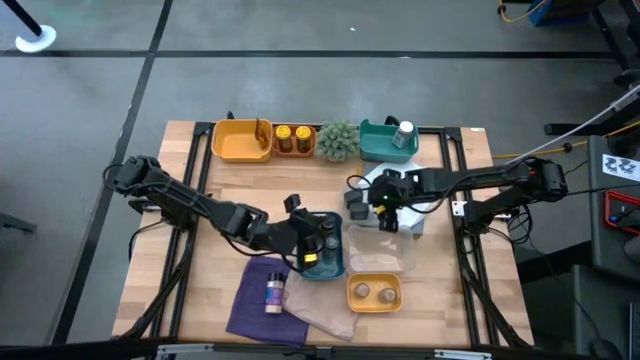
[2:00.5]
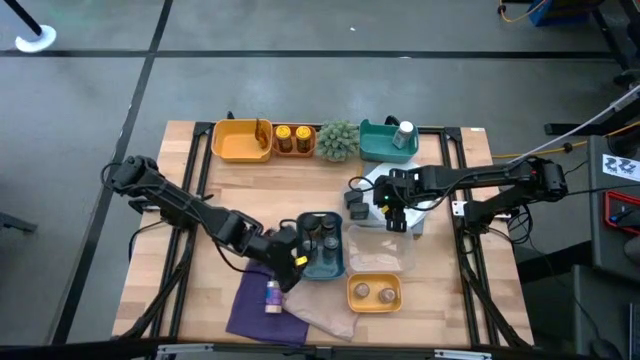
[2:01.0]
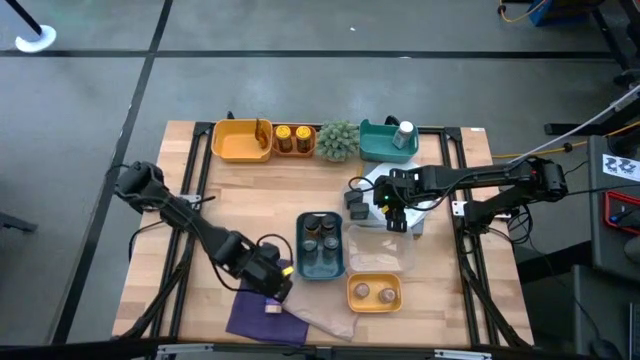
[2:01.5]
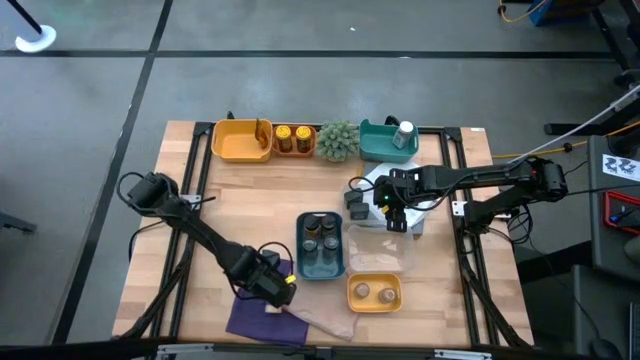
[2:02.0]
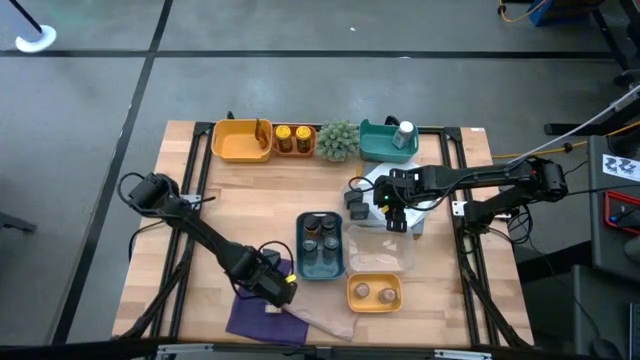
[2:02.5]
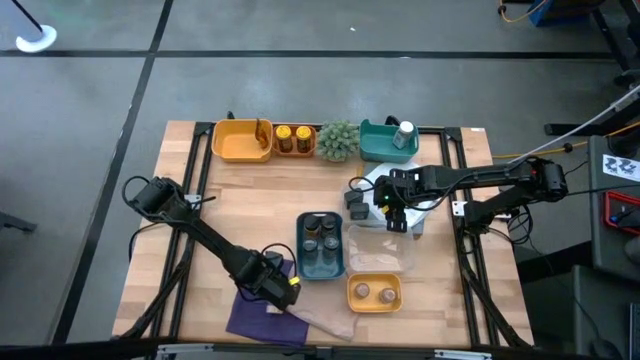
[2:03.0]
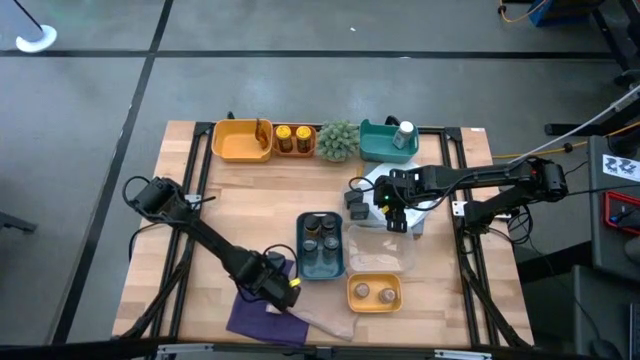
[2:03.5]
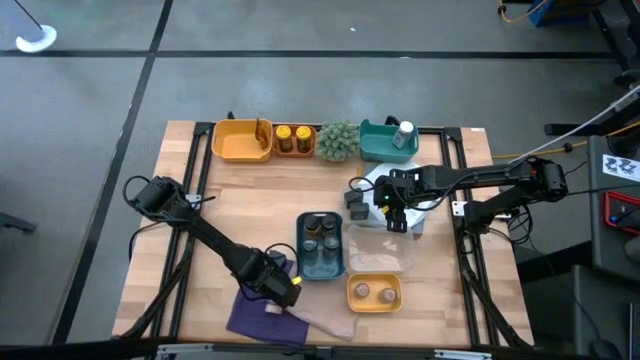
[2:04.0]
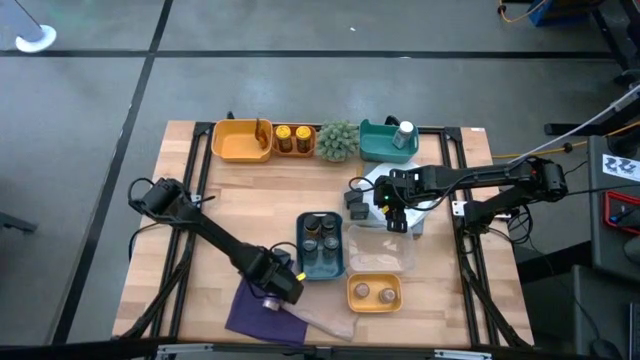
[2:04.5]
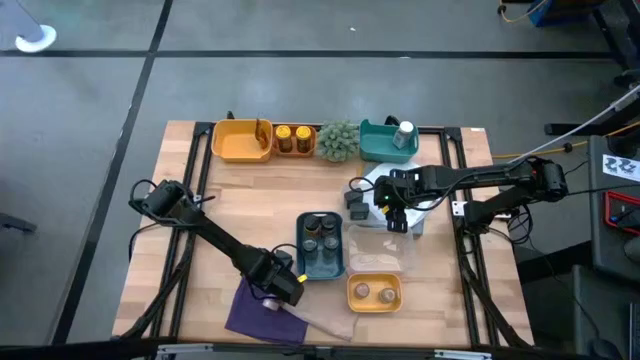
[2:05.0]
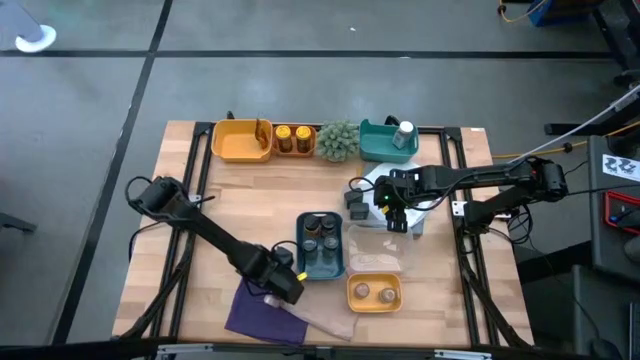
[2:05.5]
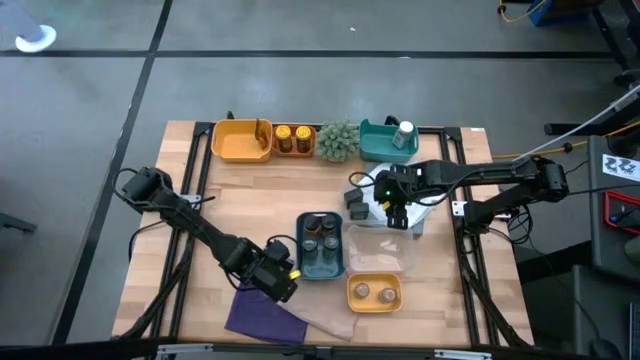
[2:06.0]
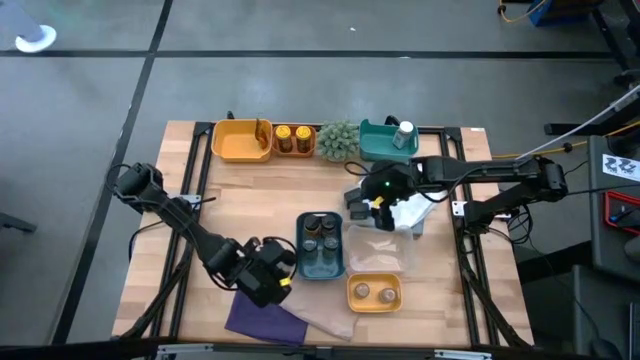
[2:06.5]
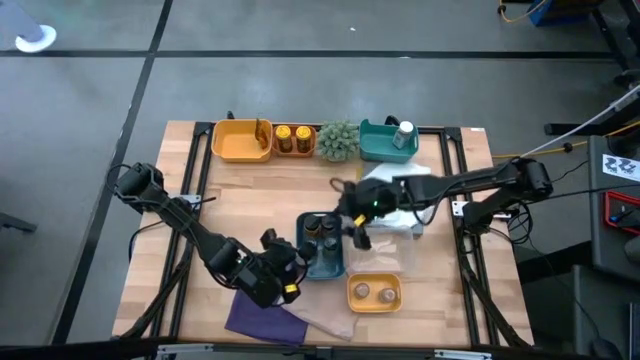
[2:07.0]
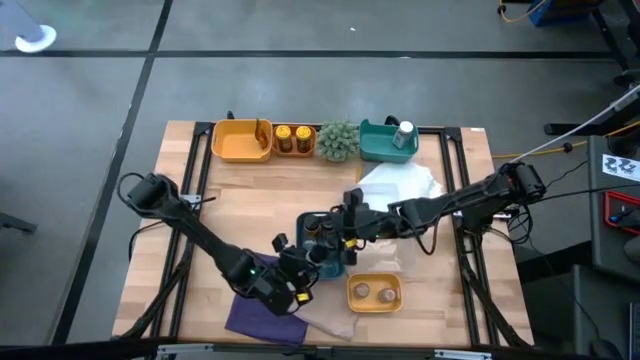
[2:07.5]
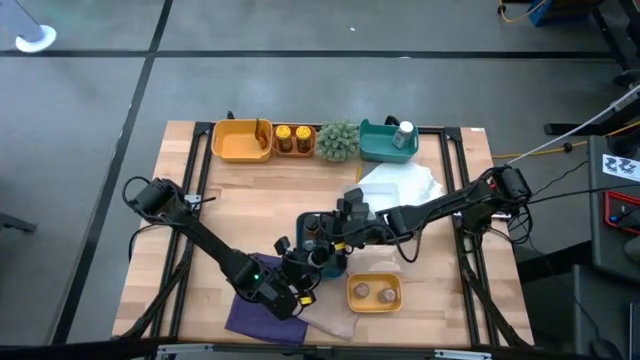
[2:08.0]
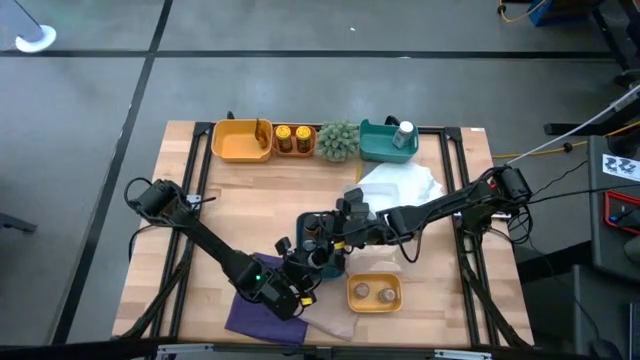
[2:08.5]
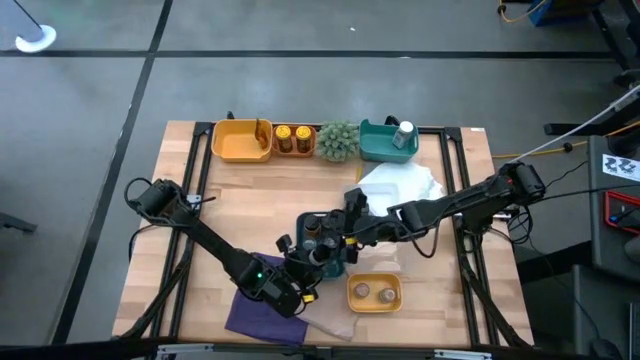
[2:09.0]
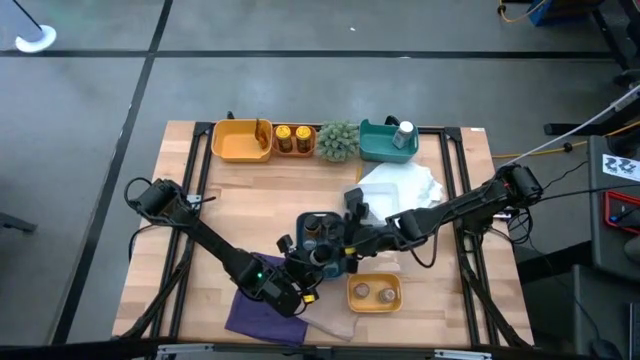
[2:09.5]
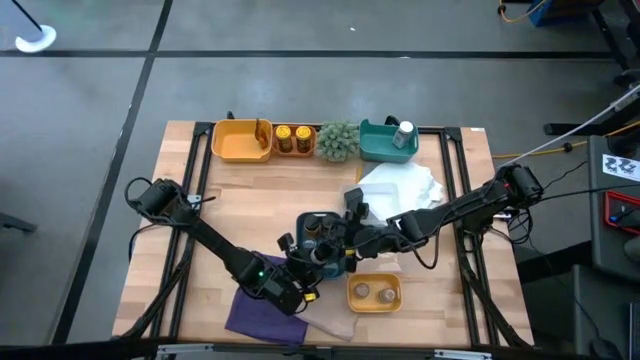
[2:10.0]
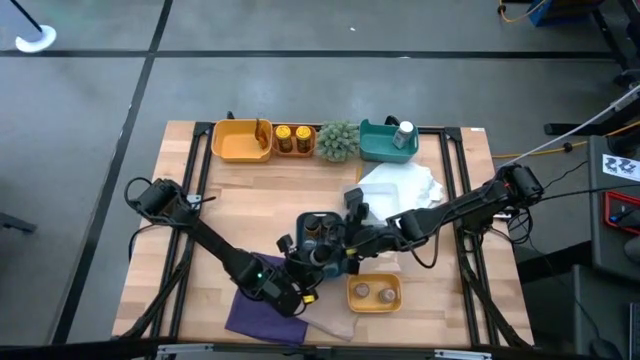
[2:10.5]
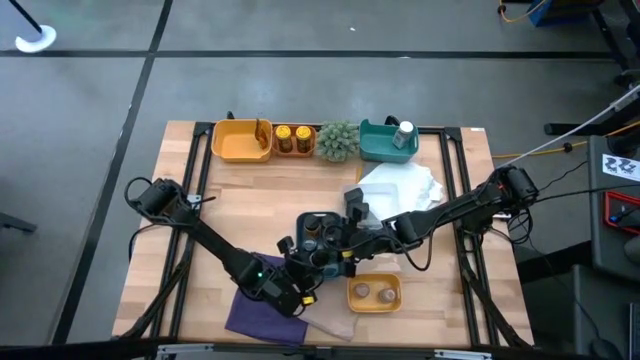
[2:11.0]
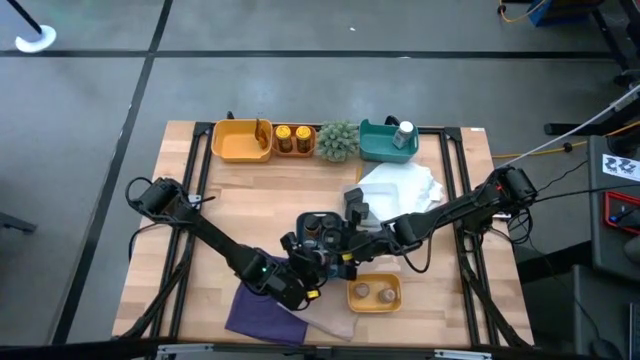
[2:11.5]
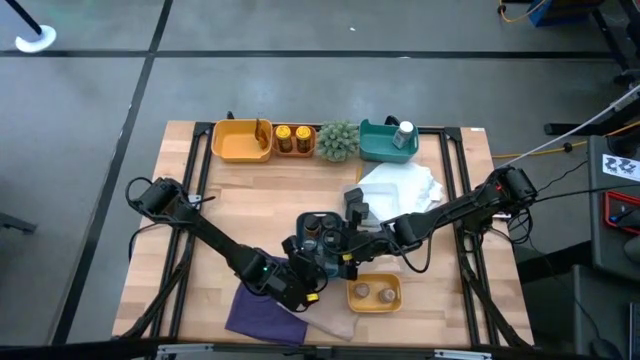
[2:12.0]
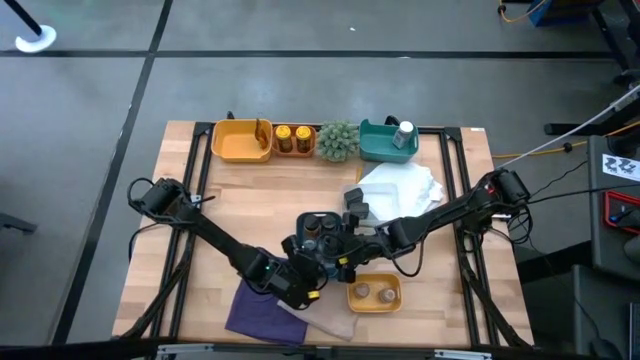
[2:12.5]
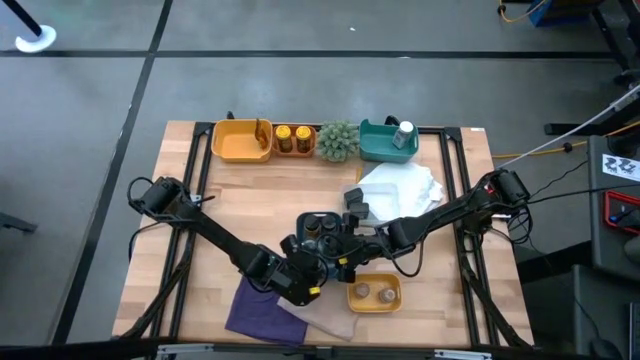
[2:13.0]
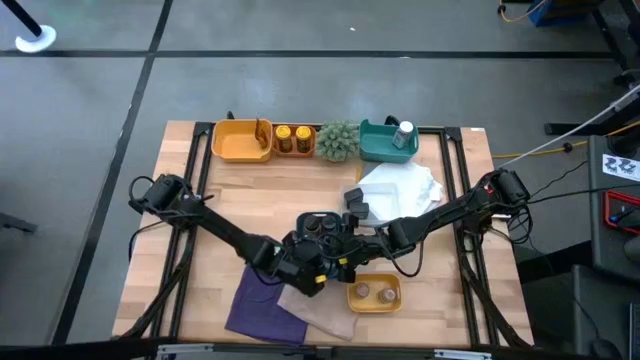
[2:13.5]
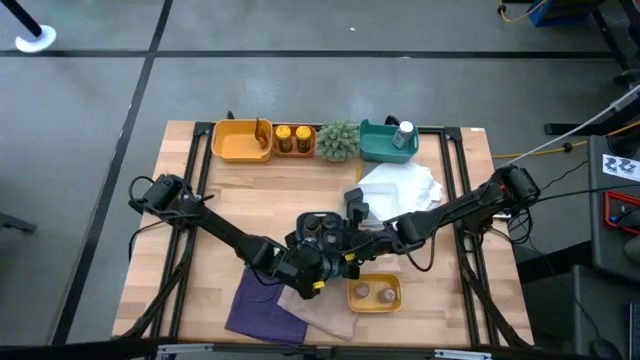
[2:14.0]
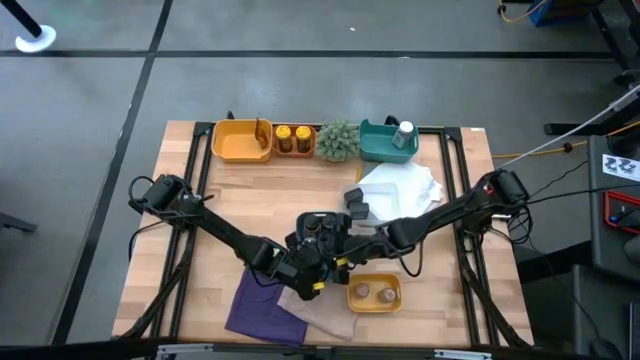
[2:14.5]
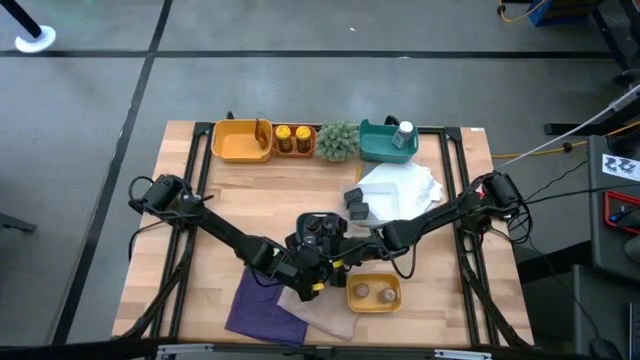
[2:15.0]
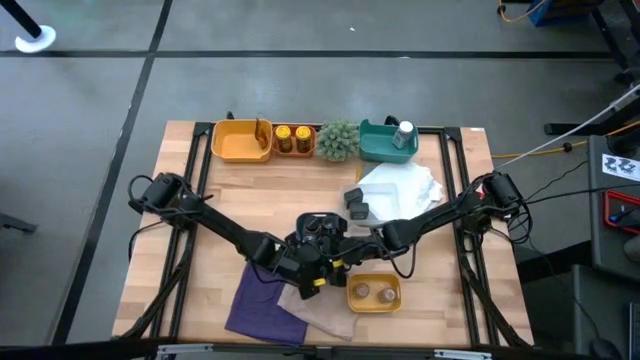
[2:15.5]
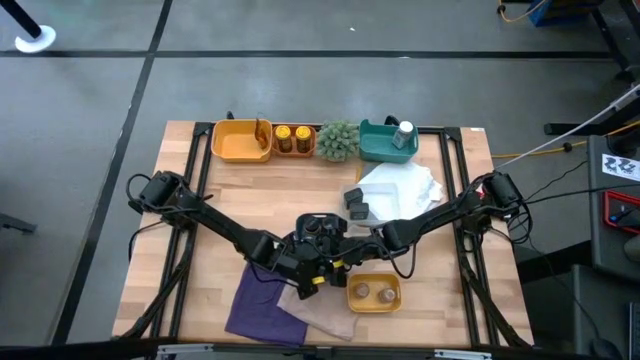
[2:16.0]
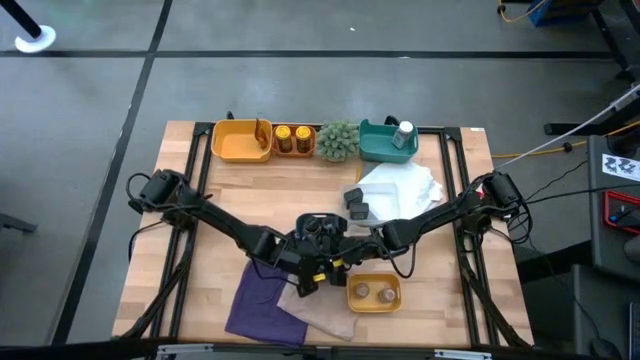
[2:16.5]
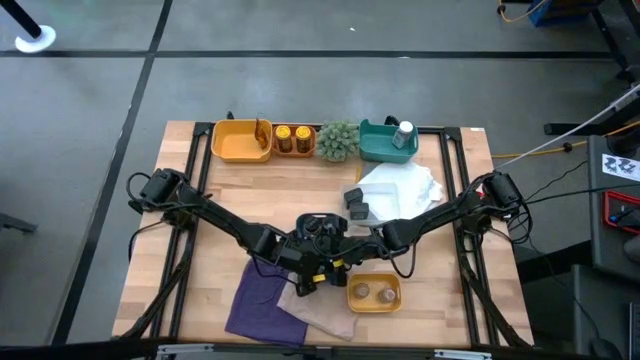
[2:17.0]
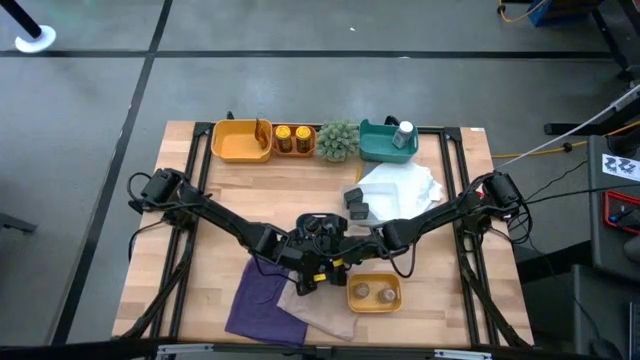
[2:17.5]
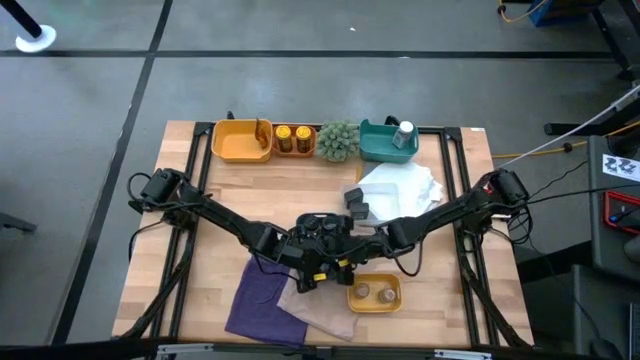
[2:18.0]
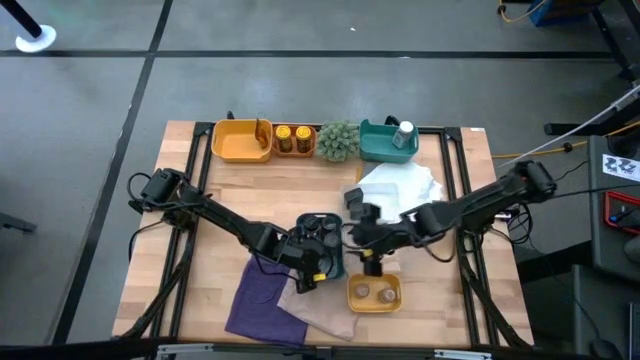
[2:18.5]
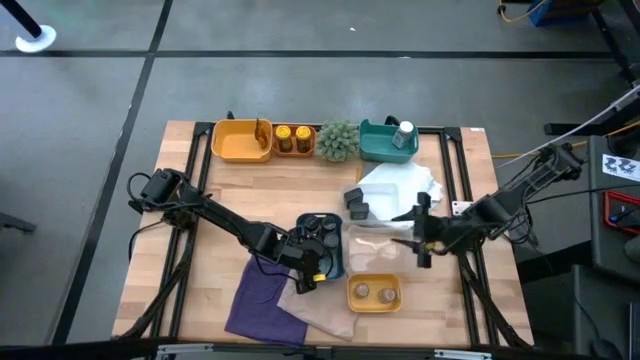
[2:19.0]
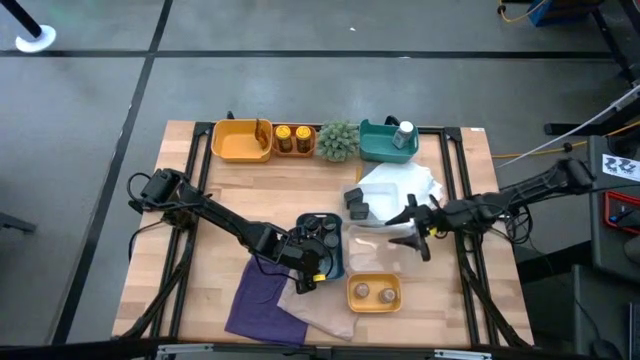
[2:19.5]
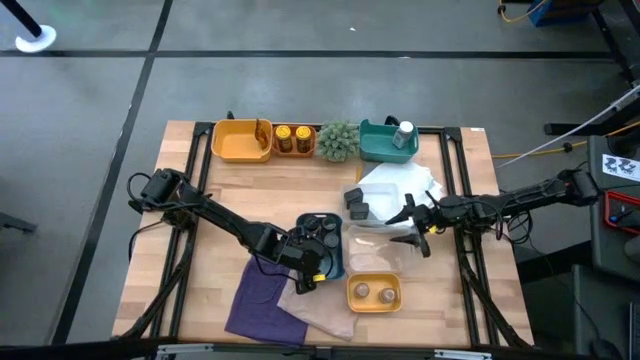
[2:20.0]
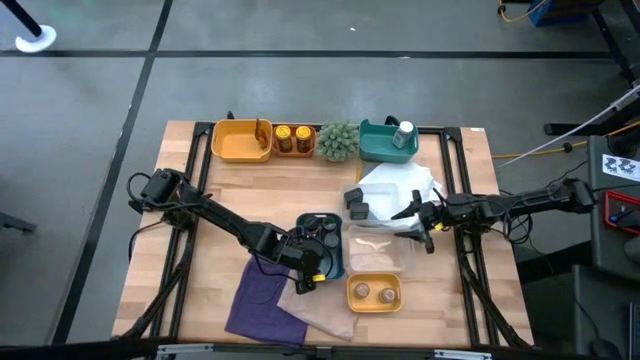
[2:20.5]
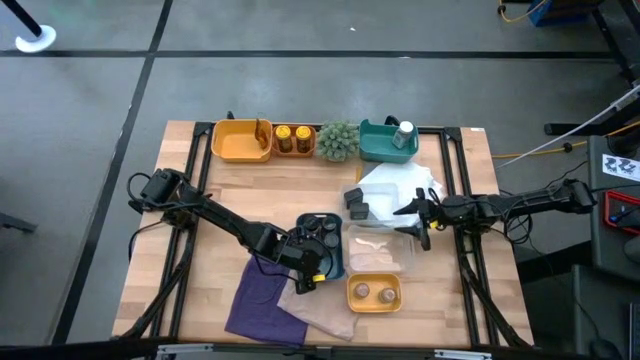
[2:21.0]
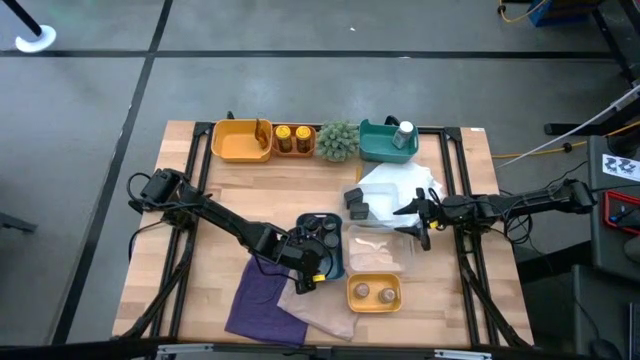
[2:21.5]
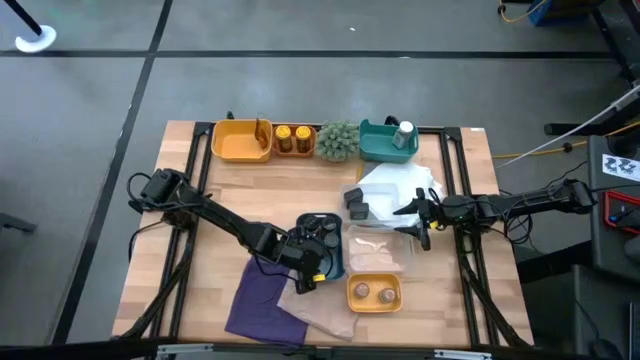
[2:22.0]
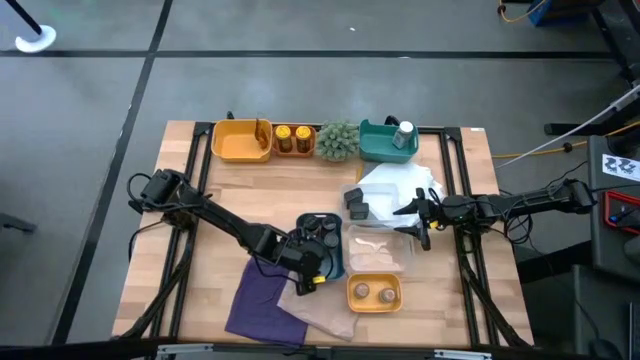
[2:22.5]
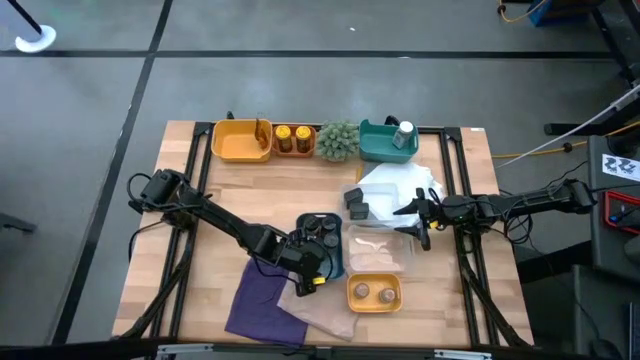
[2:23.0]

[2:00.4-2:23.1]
Task: Sort spices by type
Put the black seasoning bottle into the blue bin
